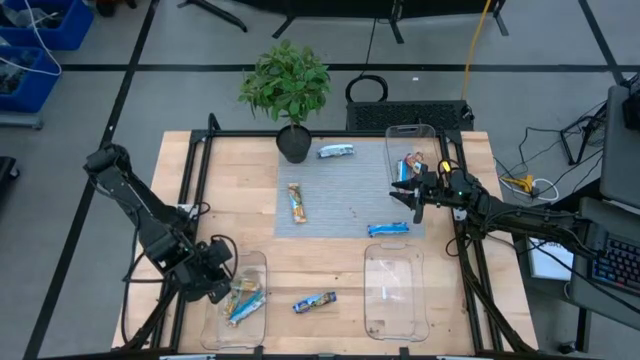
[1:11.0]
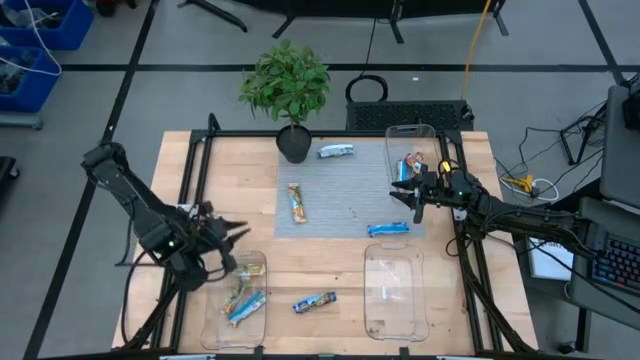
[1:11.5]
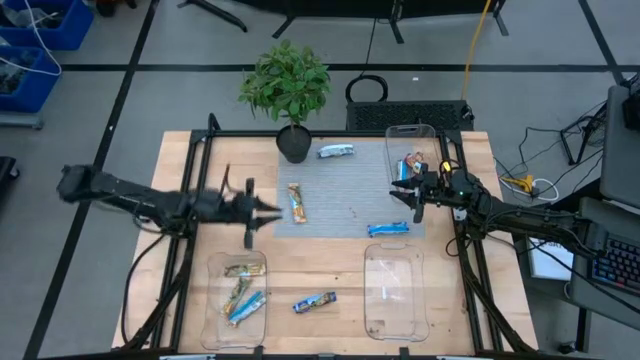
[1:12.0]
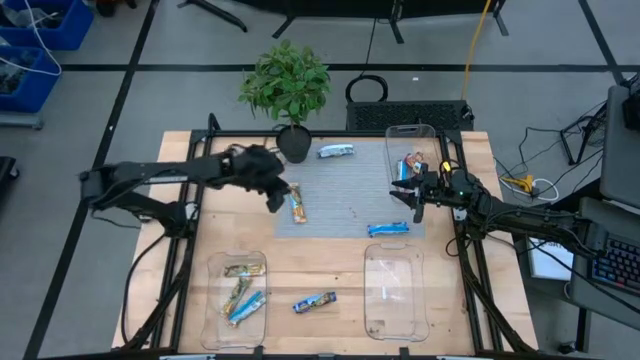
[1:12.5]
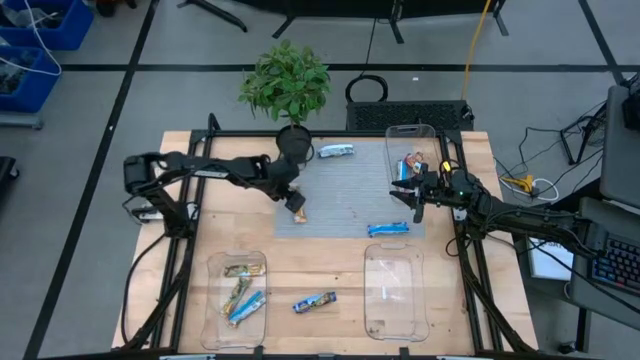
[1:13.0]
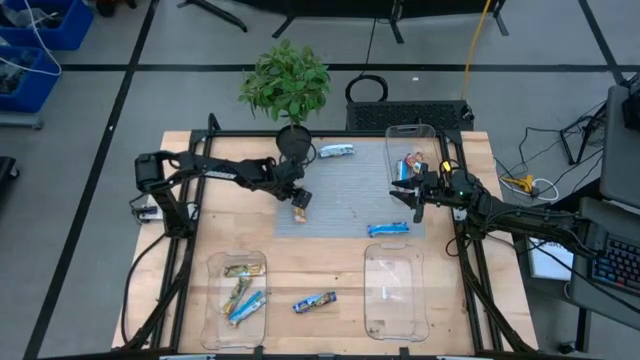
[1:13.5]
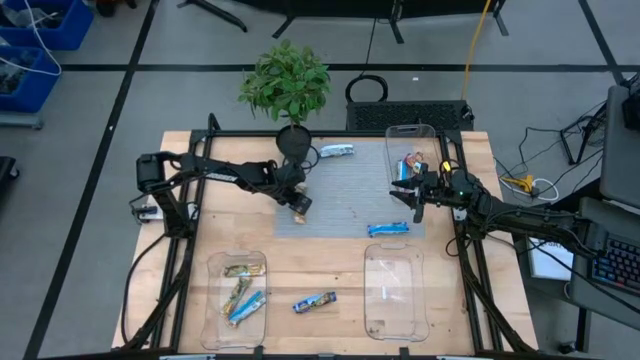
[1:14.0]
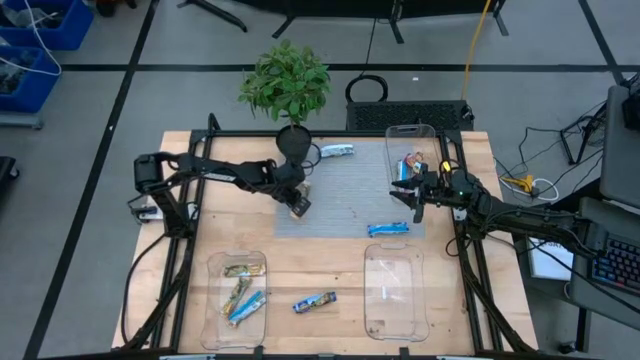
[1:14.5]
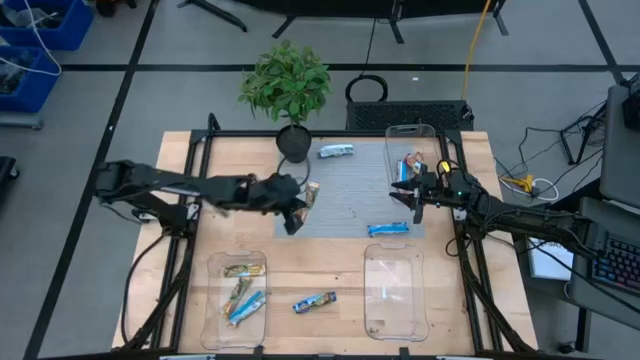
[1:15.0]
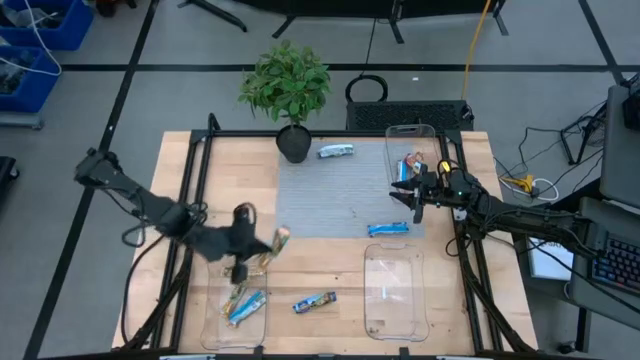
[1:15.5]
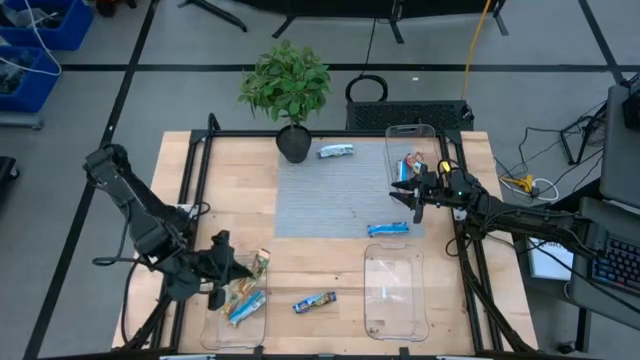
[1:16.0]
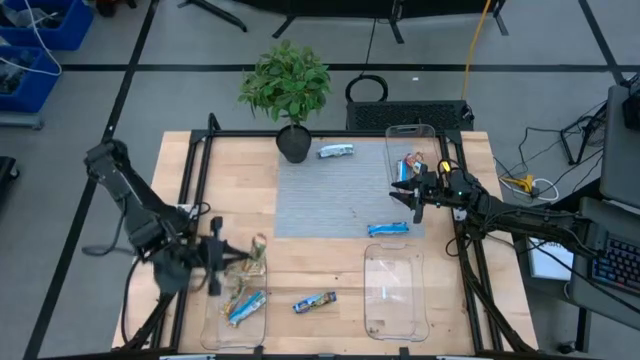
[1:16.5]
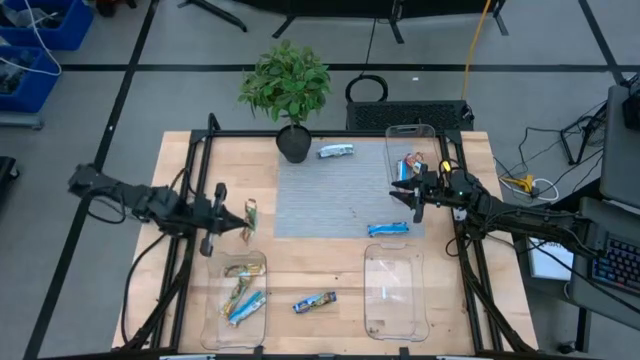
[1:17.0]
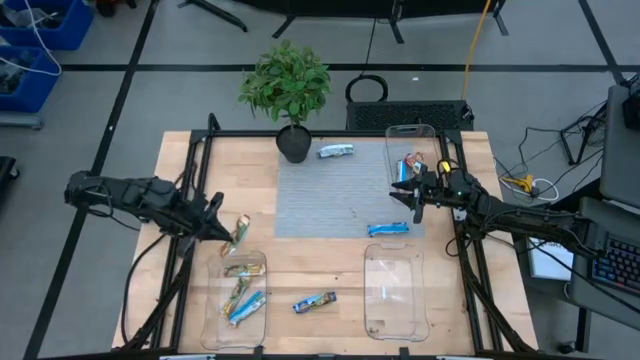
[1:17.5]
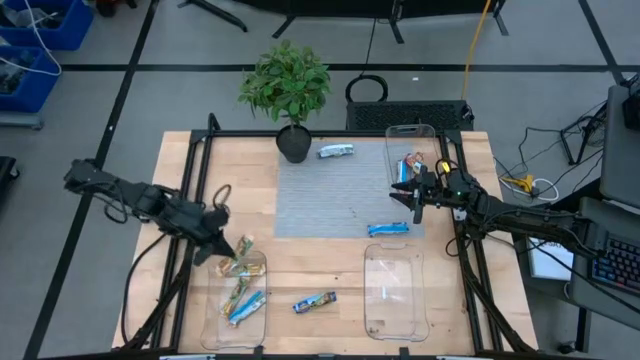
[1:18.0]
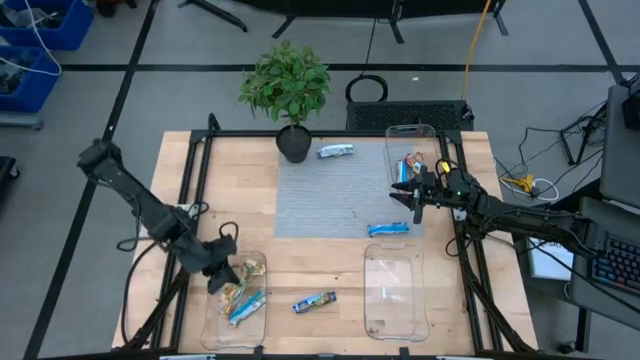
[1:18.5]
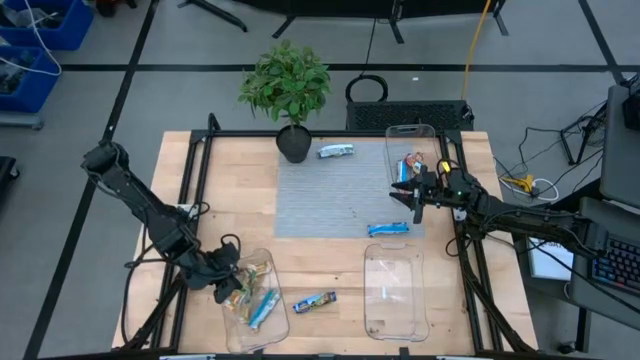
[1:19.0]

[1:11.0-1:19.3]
Task: Pick and place Granola Bars by type
Put the yellow granola bar into the bottom left transparent bin

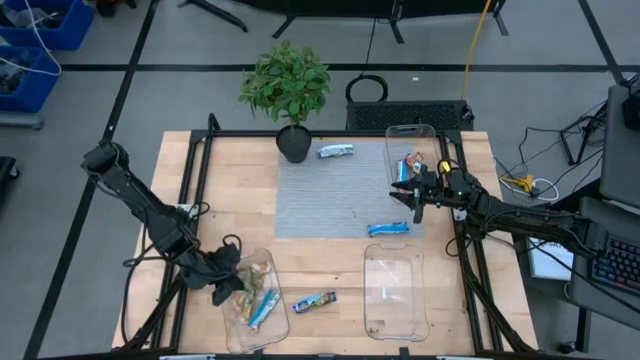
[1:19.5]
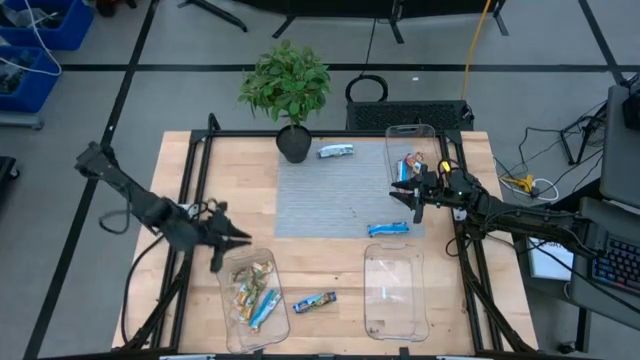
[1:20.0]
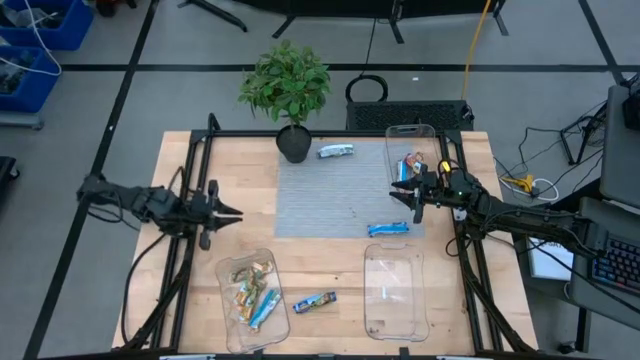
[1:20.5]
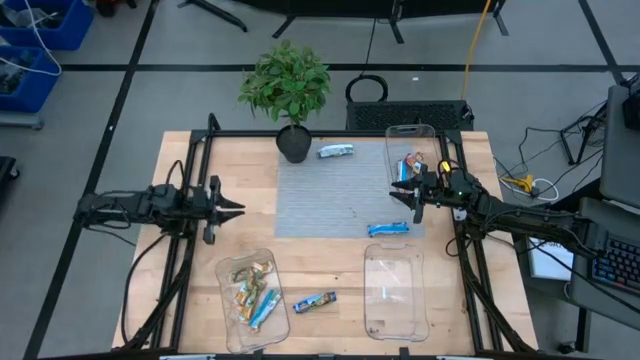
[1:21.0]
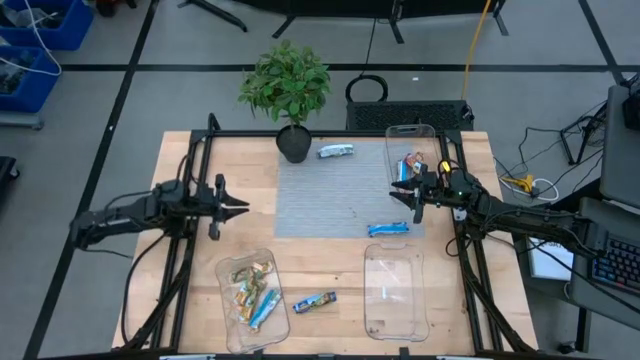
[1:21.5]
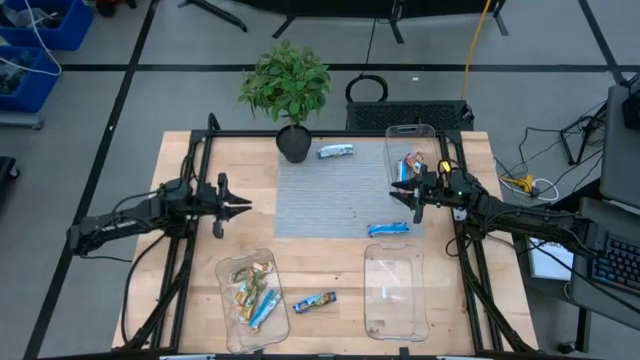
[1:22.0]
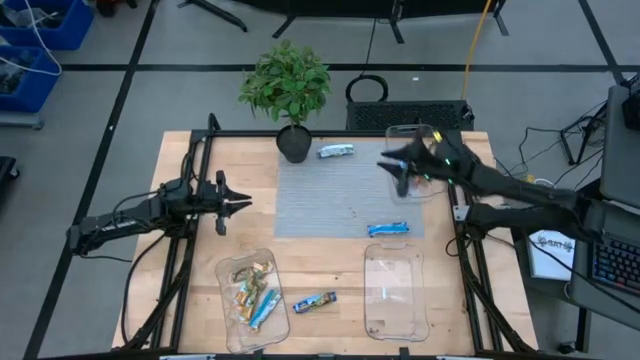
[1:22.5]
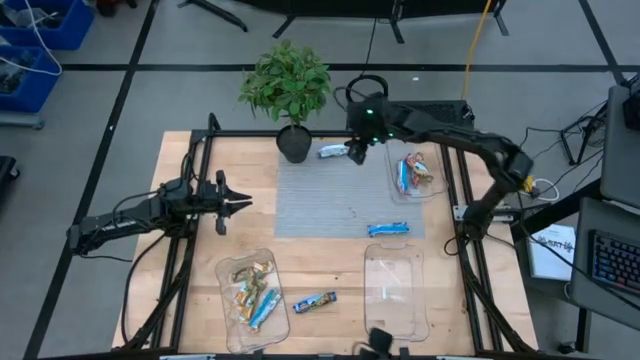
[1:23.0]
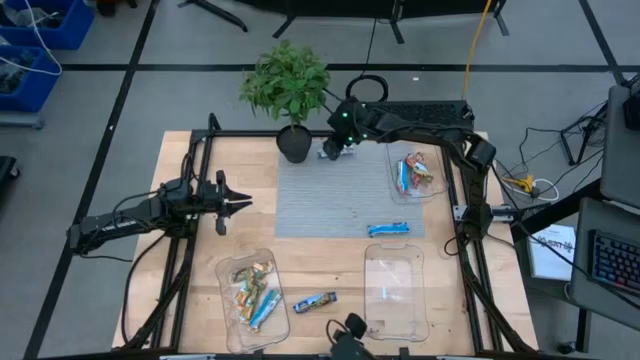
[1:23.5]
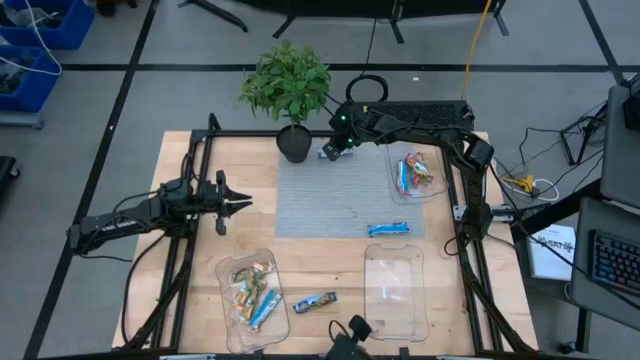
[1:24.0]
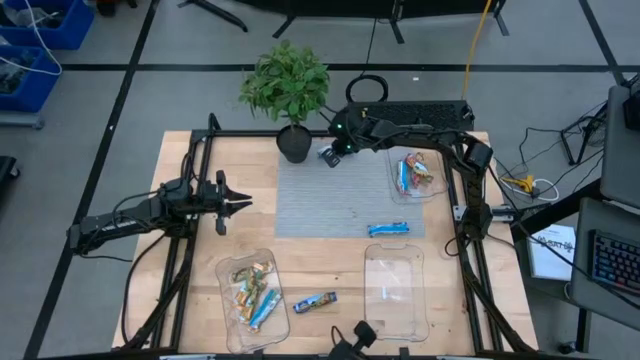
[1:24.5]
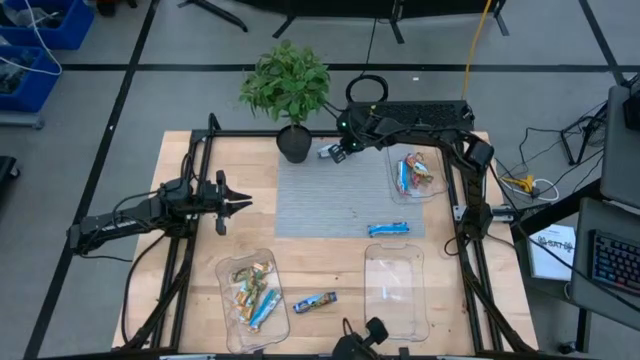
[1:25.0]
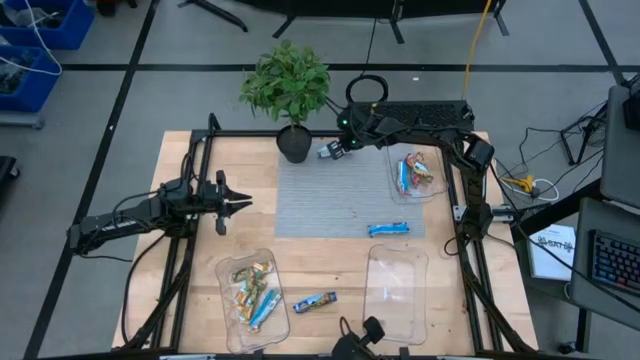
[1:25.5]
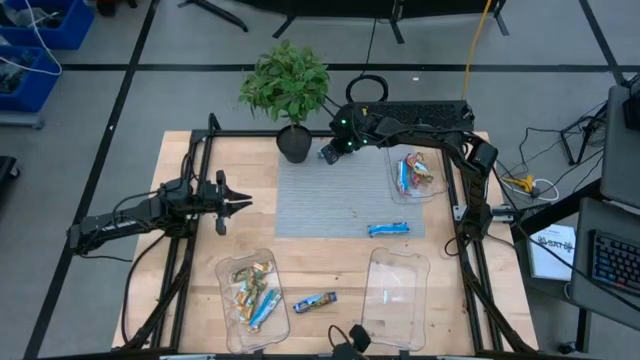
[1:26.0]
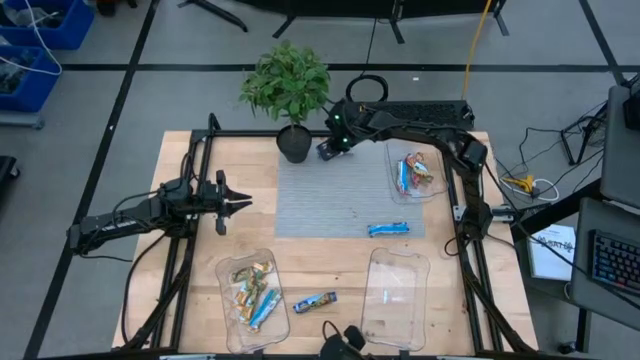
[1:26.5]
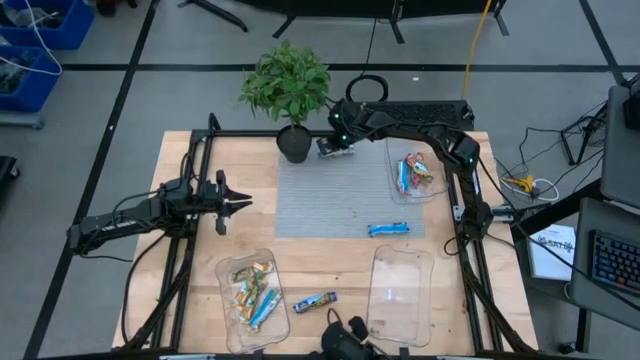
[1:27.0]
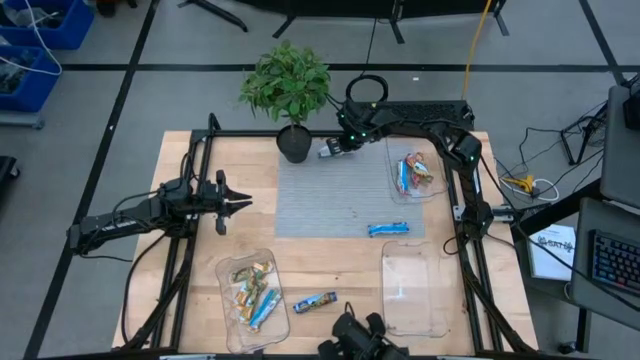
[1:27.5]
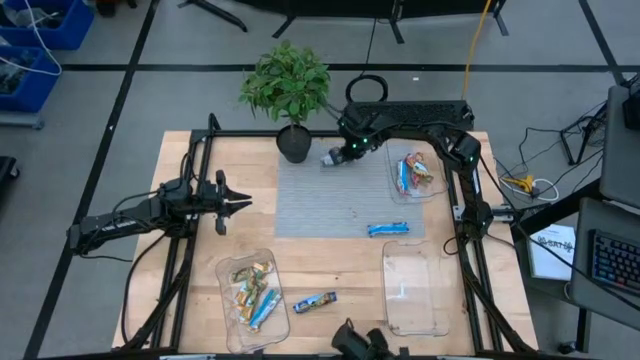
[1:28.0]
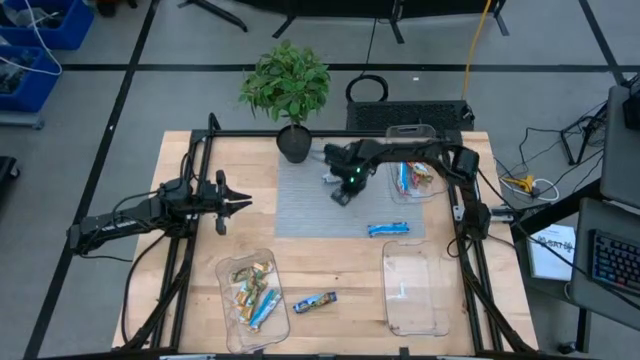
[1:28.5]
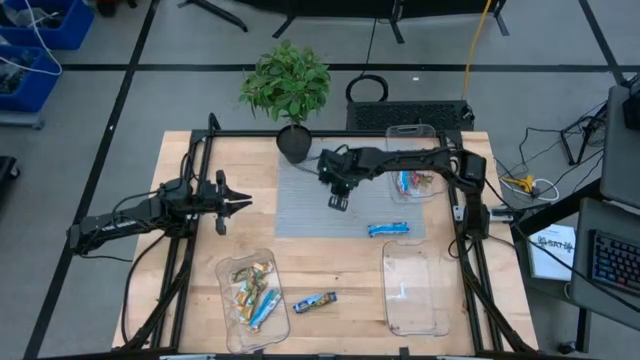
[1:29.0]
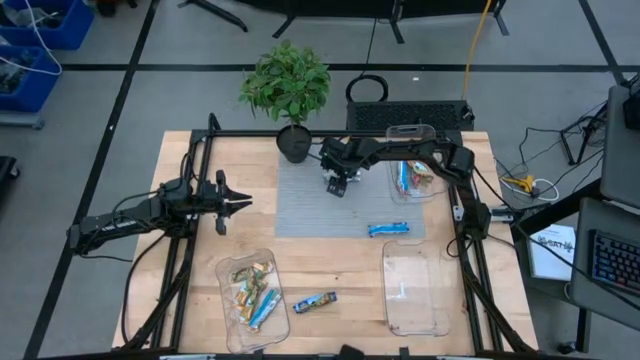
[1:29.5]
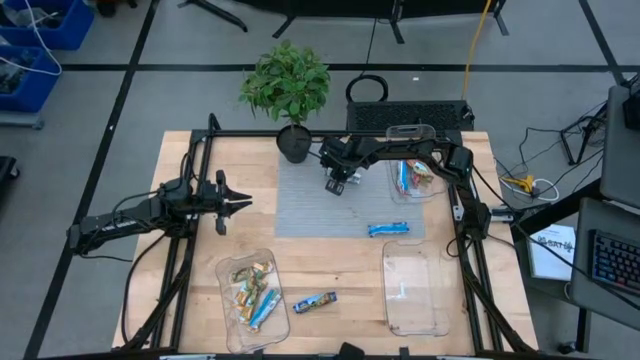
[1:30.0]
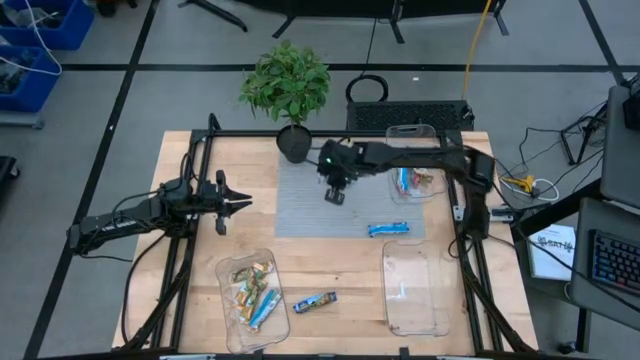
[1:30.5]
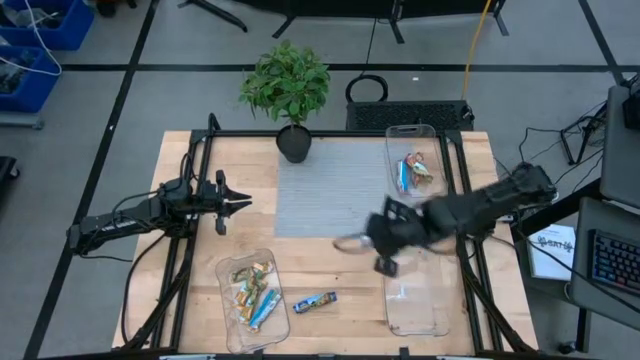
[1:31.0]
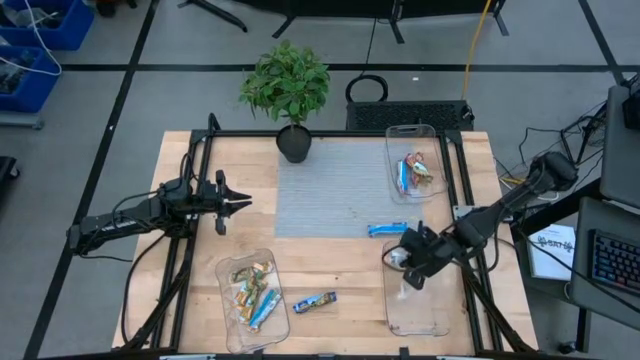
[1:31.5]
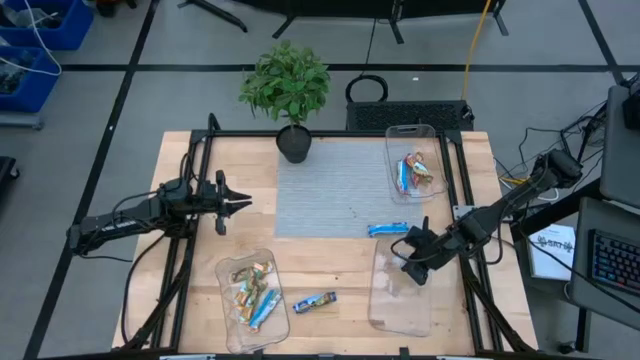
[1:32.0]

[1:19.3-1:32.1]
Put the top blue granola bar into the bottom right transparent bin
